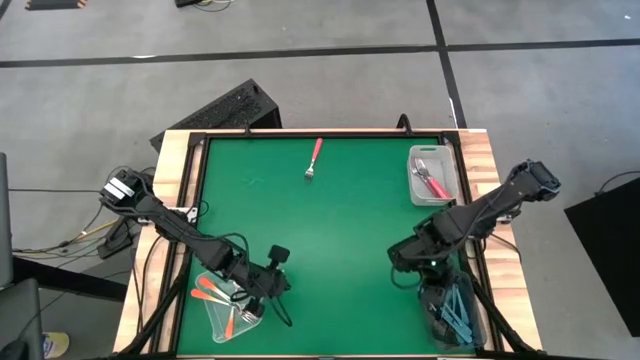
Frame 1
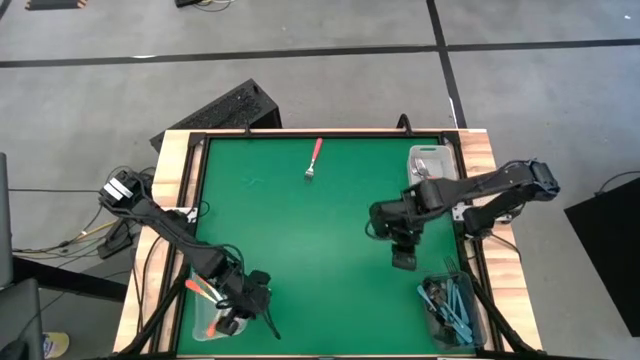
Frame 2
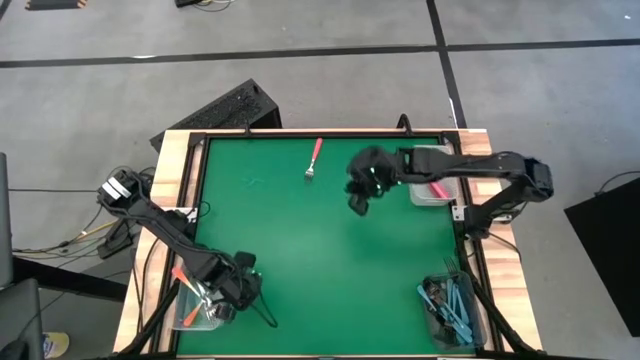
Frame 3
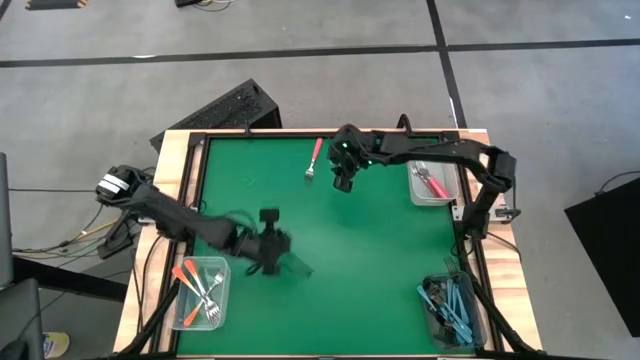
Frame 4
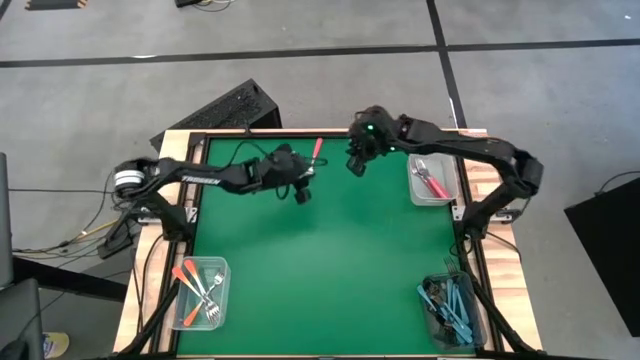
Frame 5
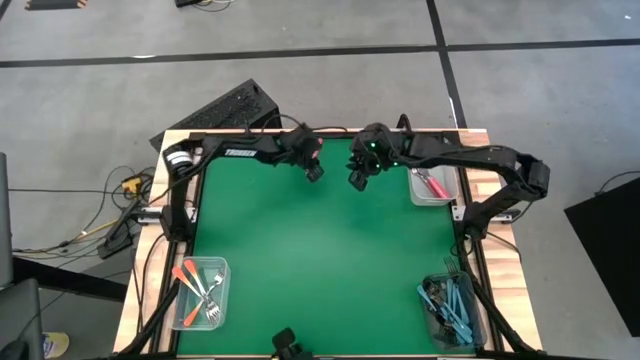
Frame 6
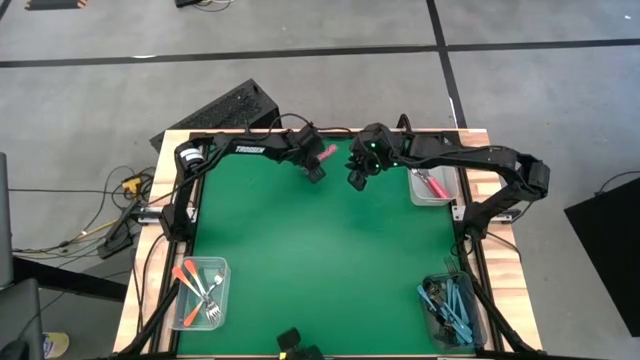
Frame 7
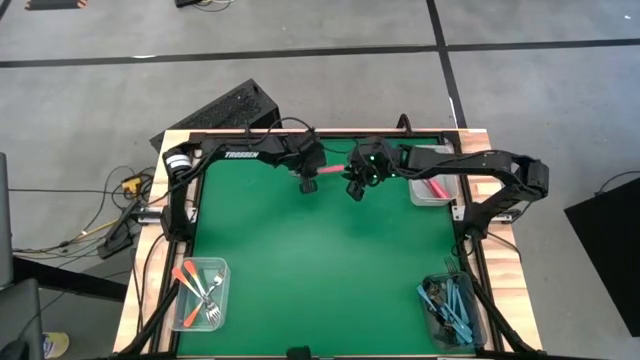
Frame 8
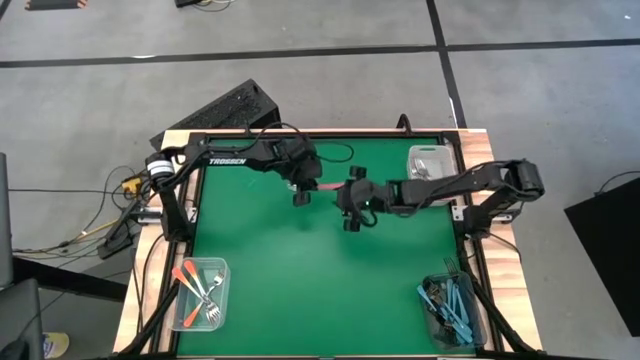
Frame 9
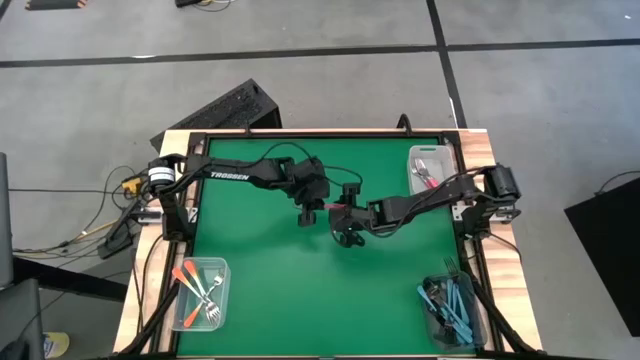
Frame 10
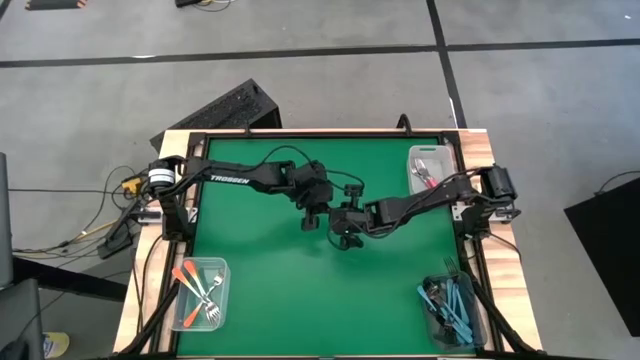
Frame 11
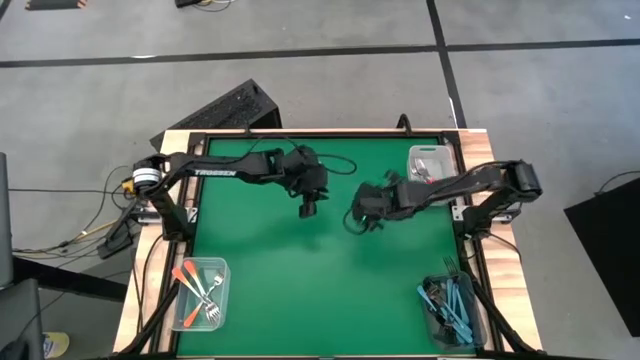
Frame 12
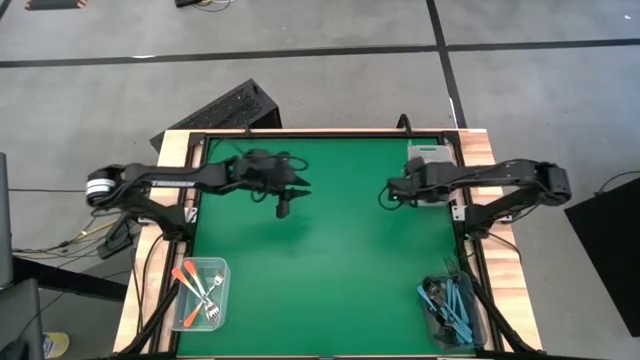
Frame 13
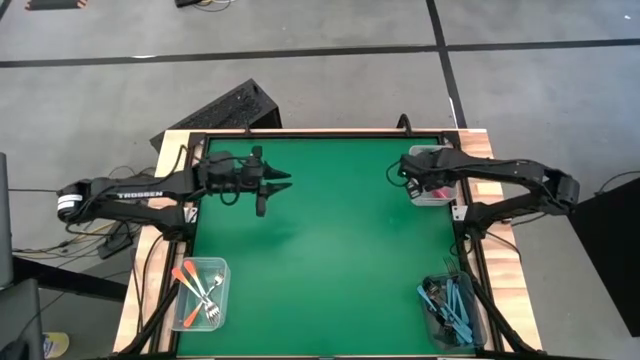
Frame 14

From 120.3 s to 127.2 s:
Task: Sort silverware by color (type)
Put the pink fork into the white bin

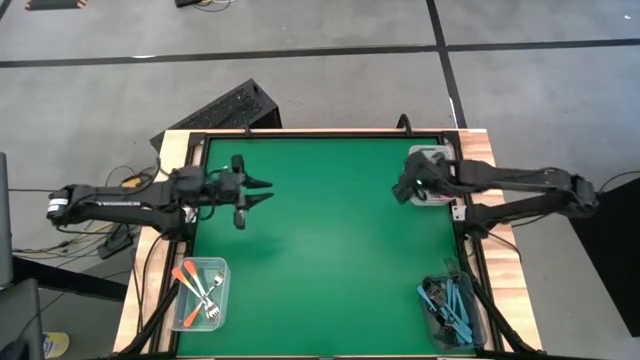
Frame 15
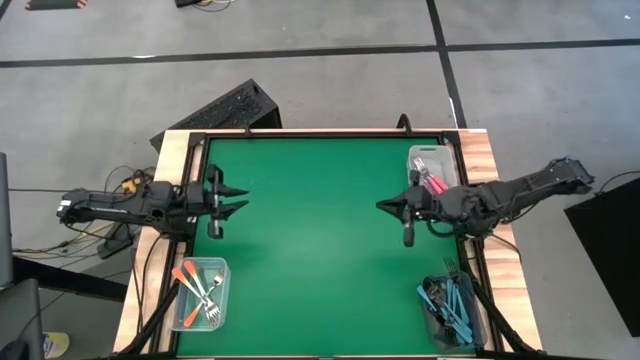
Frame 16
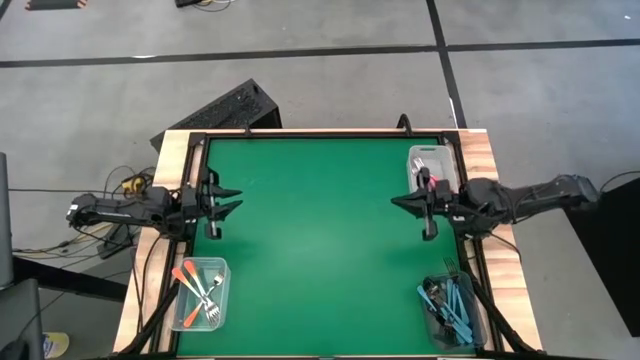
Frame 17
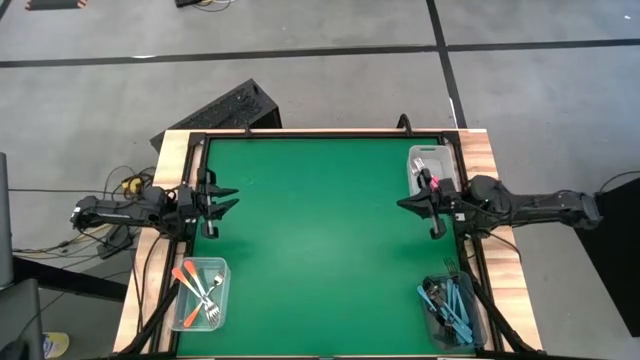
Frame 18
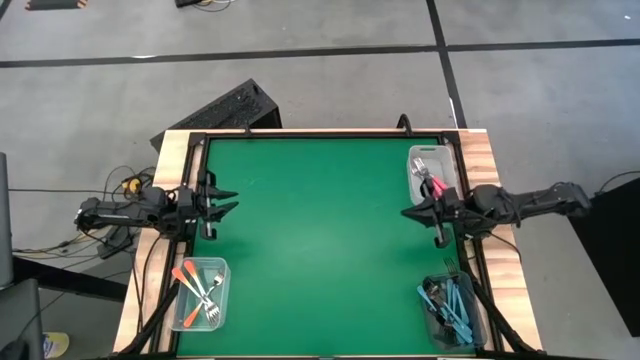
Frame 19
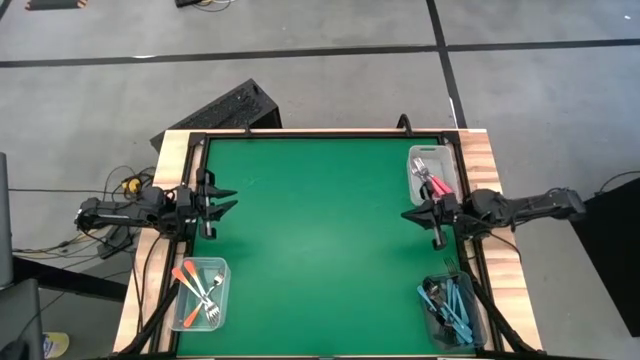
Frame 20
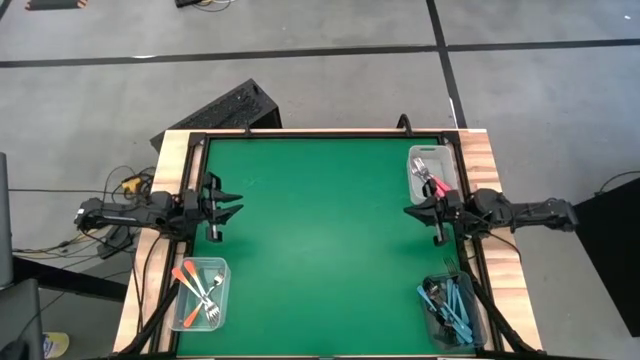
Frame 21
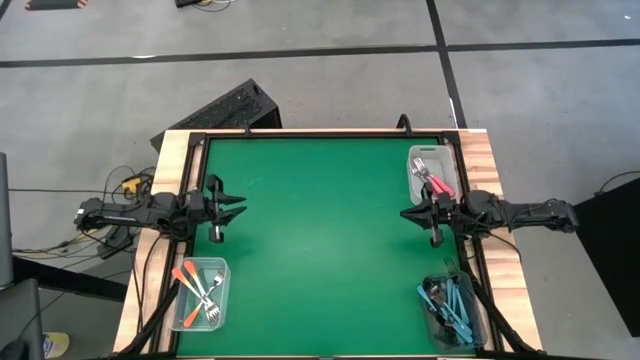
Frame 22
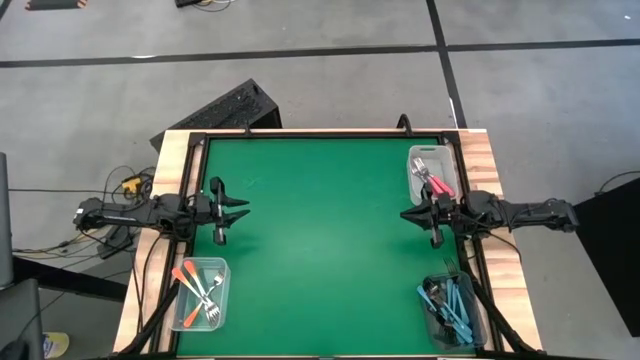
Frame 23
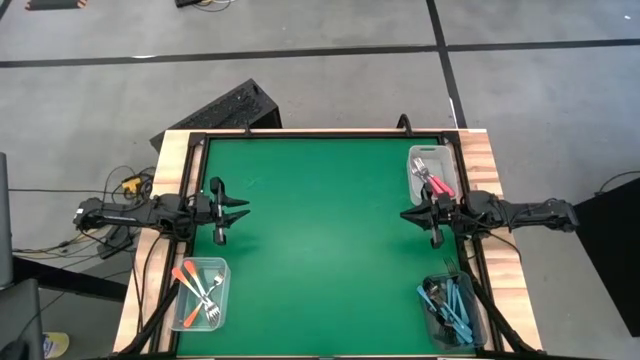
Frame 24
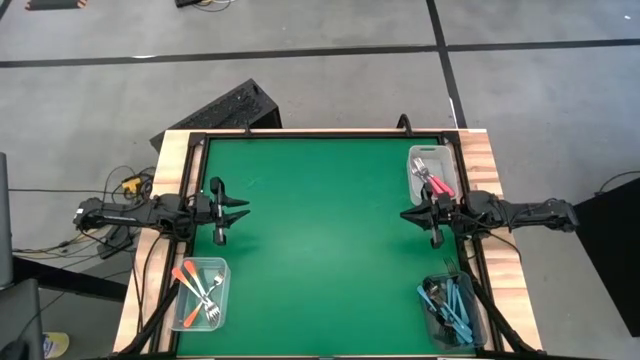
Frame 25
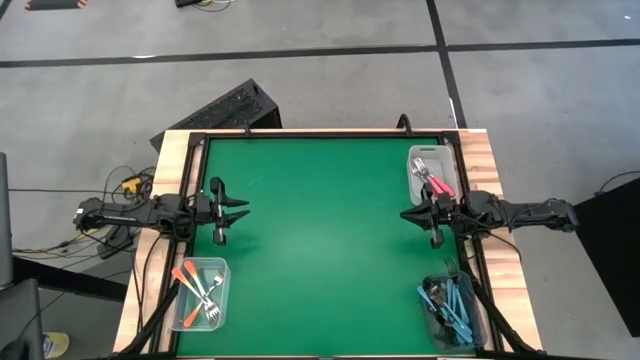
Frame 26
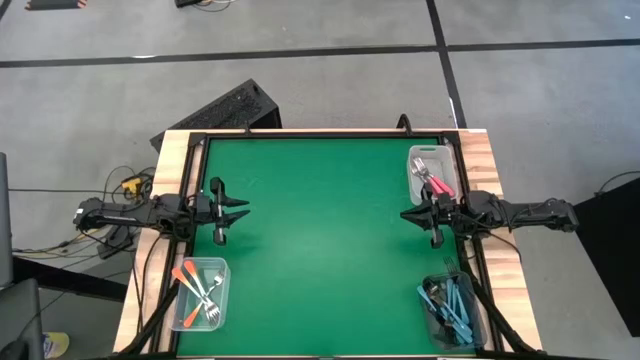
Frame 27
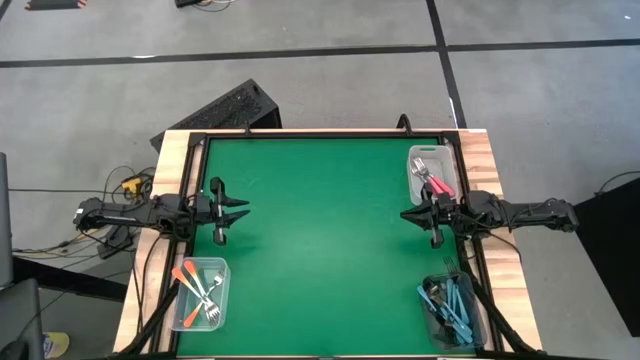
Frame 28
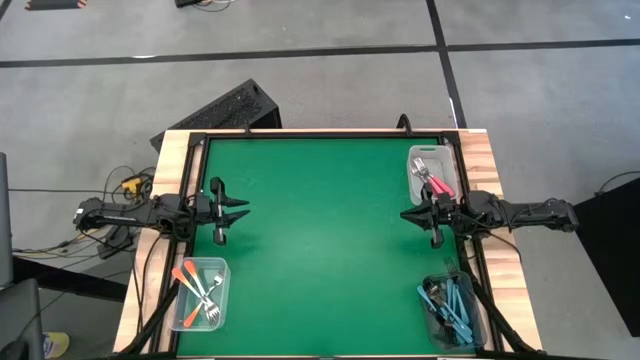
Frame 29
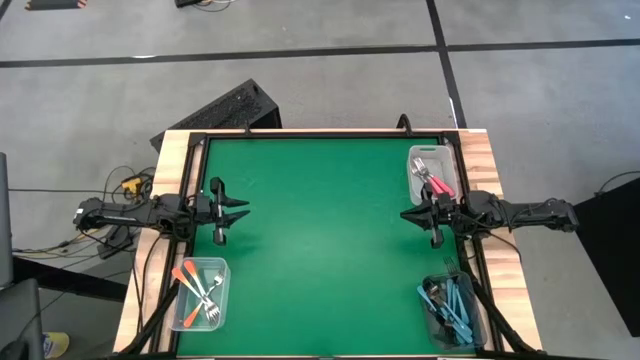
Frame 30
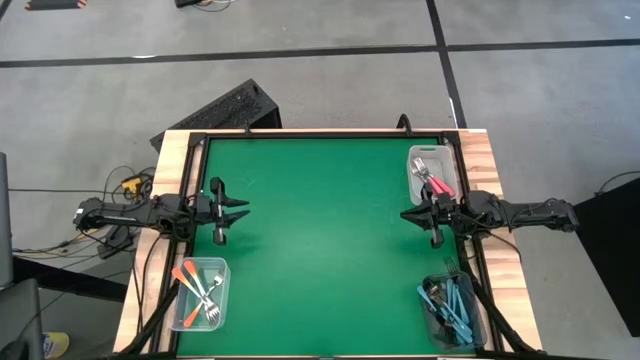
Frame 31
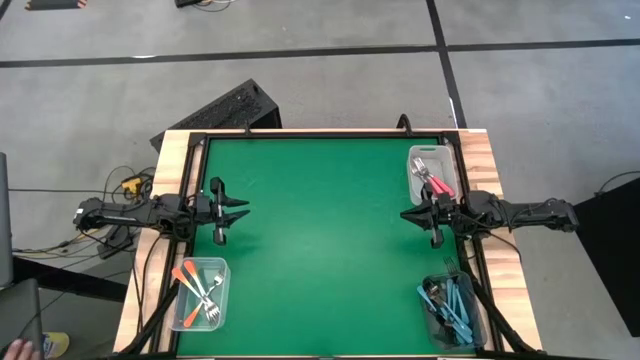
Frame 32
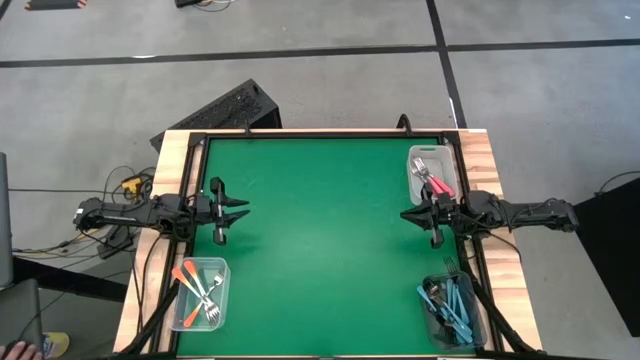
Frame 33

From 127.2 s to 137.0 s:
Return to Home Position

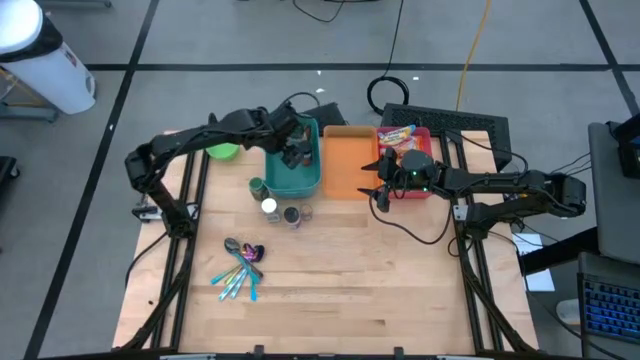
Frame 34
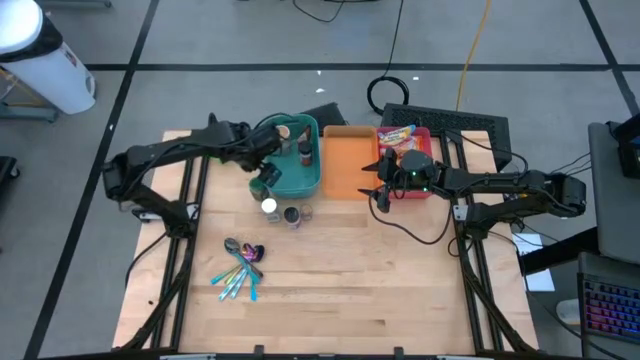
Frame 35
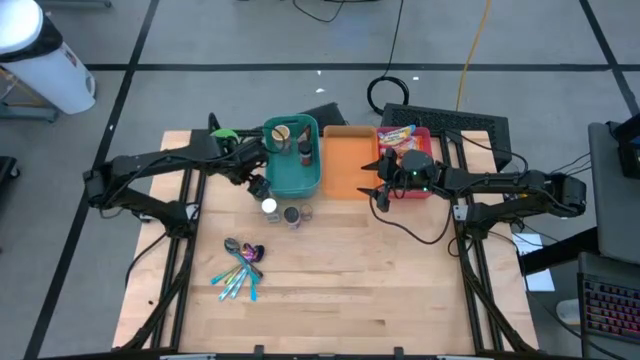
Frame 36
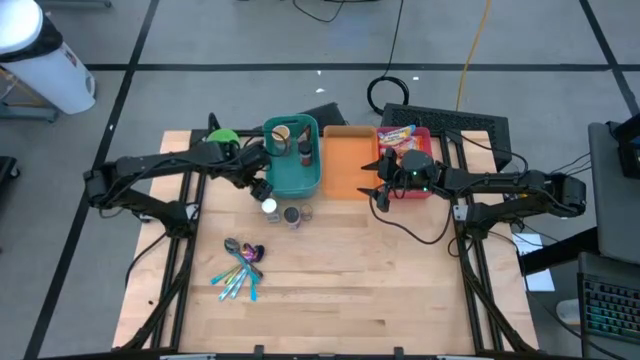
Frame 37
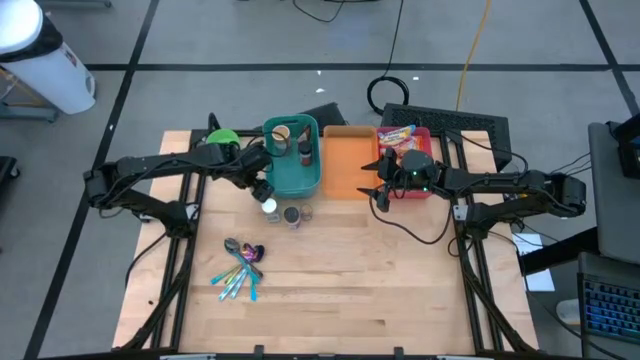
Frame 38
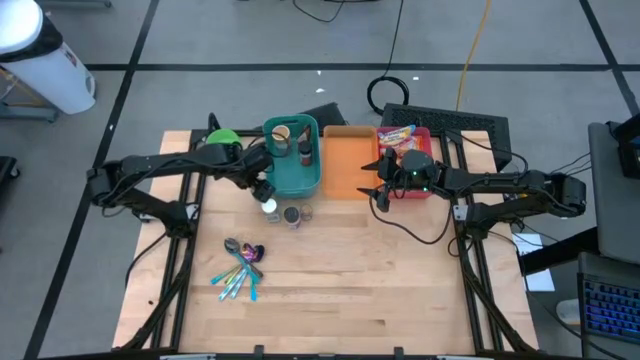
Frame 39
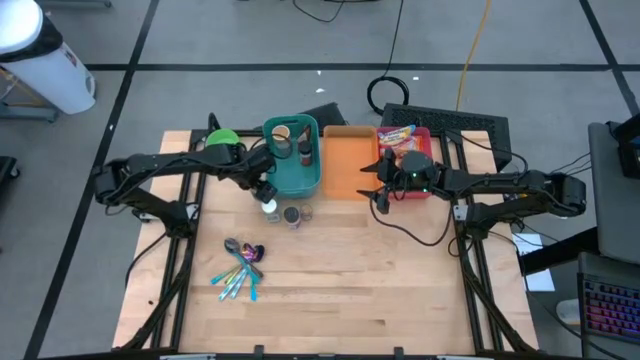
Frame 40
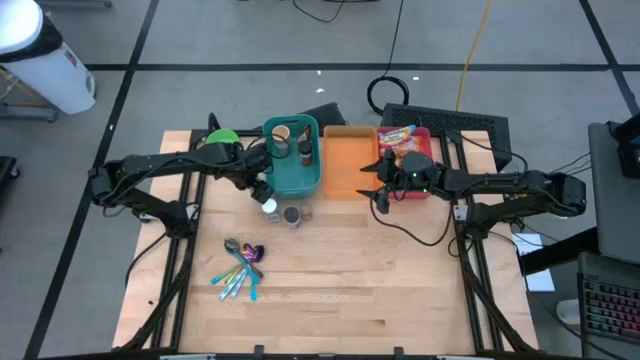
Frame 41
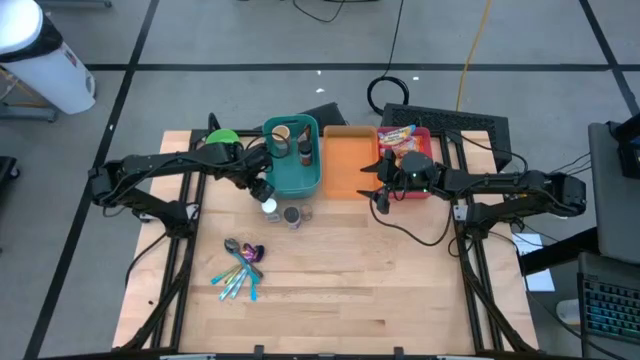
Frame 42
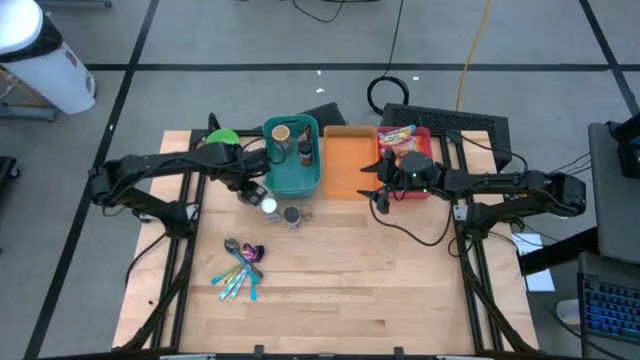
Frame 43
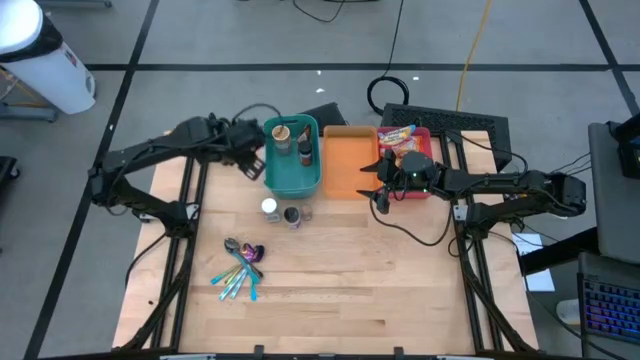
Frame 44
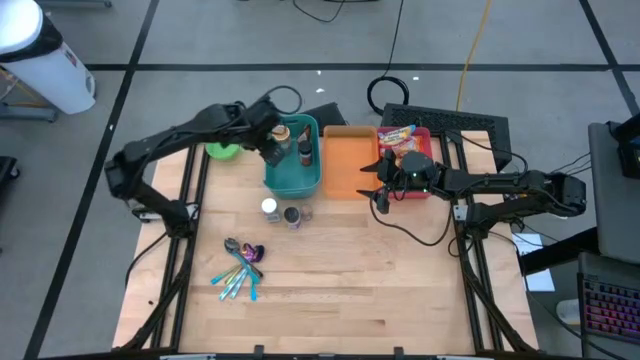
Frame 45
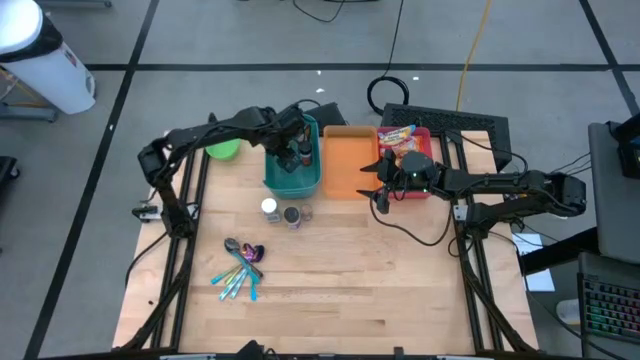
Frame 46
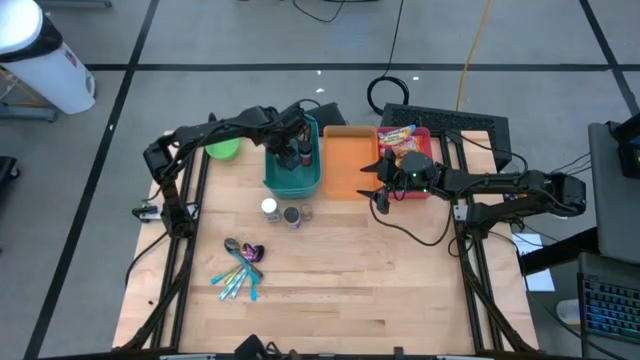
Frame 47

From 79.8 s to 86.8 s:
Task: Pick & Place Food Item
Put the green seasoning bottle into the green bin
